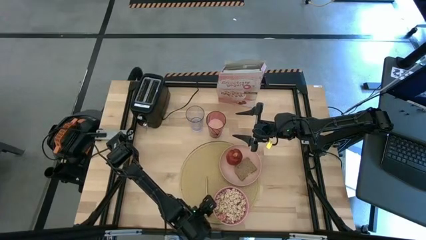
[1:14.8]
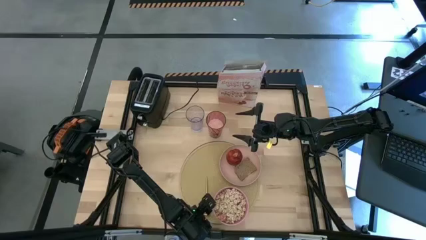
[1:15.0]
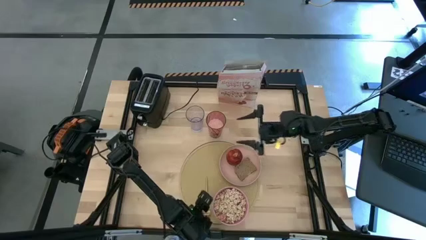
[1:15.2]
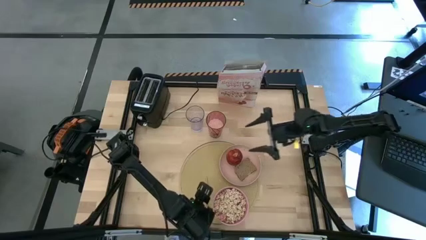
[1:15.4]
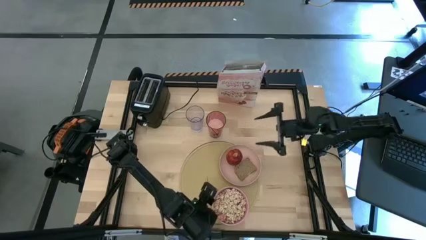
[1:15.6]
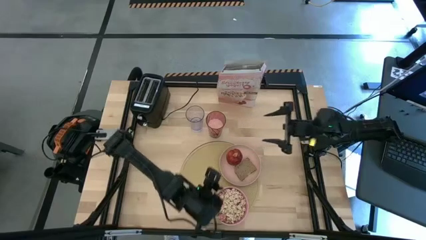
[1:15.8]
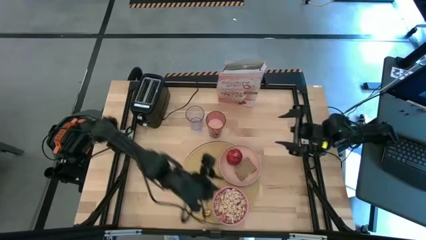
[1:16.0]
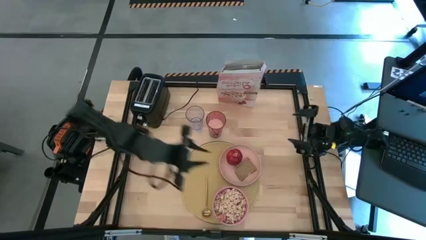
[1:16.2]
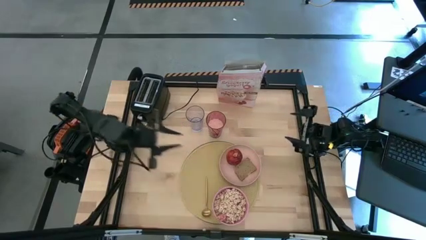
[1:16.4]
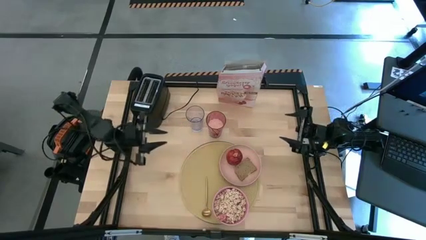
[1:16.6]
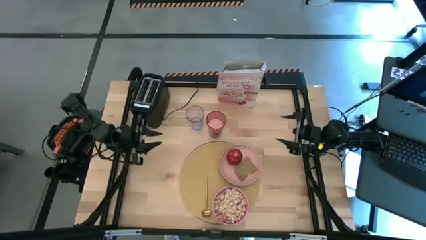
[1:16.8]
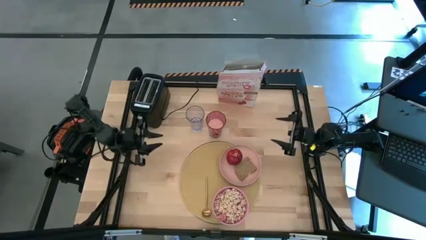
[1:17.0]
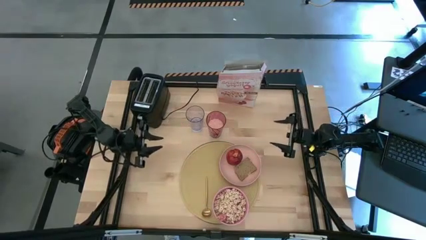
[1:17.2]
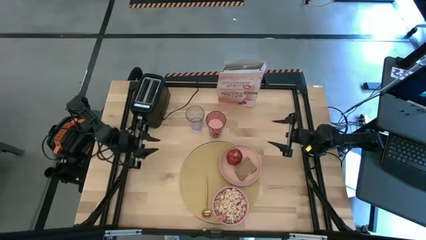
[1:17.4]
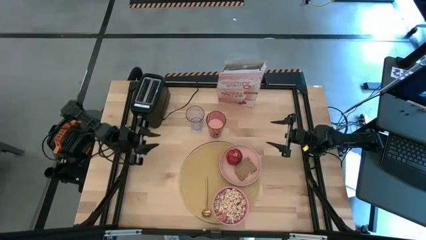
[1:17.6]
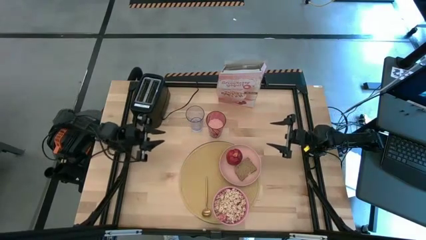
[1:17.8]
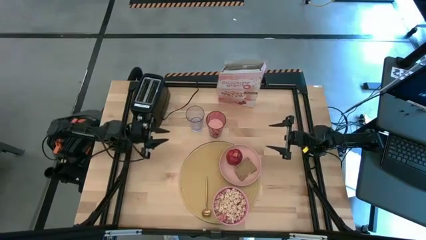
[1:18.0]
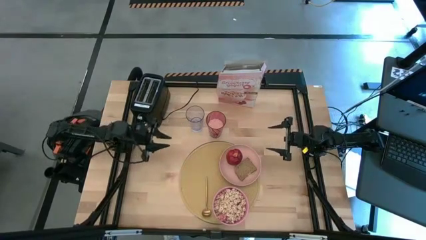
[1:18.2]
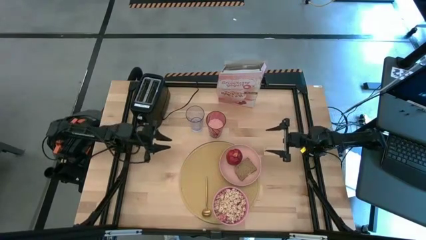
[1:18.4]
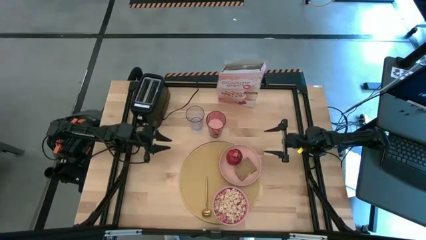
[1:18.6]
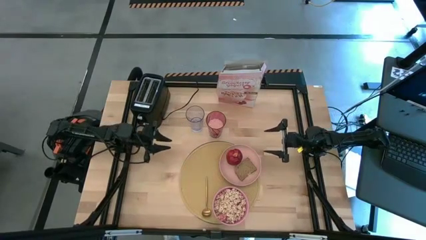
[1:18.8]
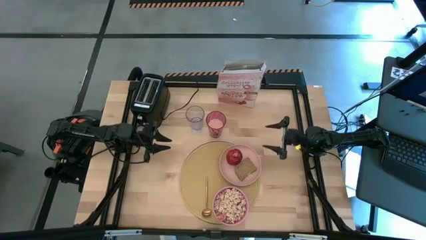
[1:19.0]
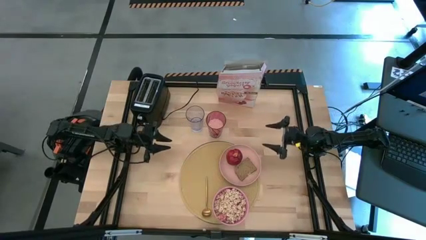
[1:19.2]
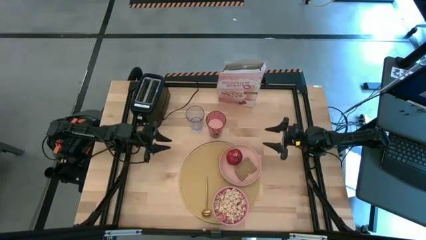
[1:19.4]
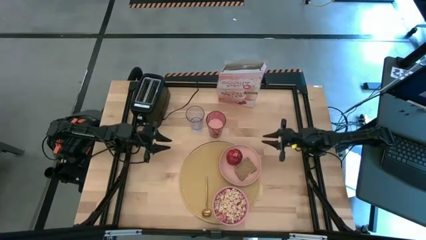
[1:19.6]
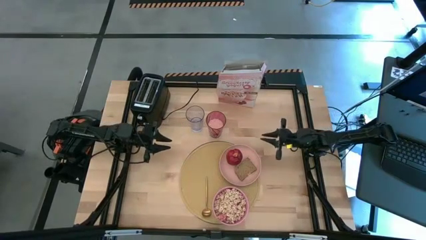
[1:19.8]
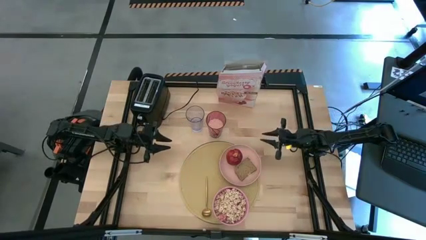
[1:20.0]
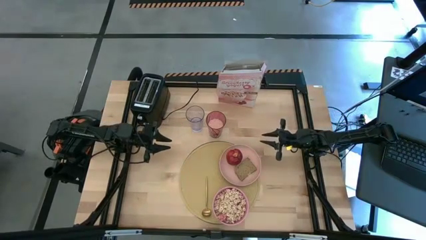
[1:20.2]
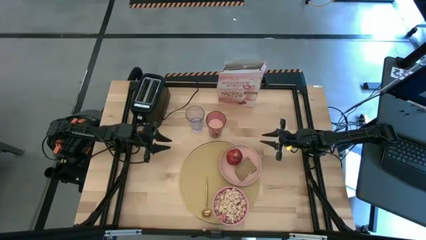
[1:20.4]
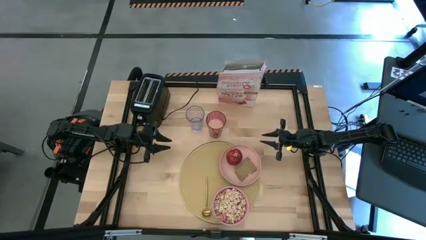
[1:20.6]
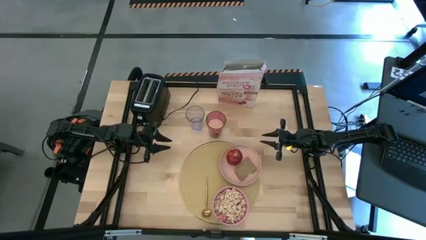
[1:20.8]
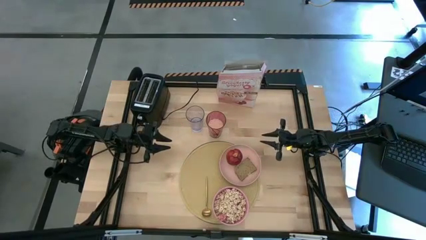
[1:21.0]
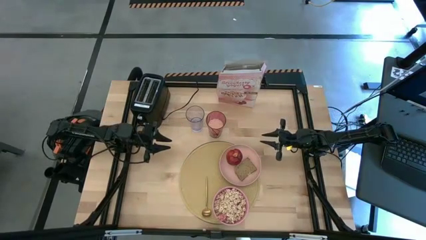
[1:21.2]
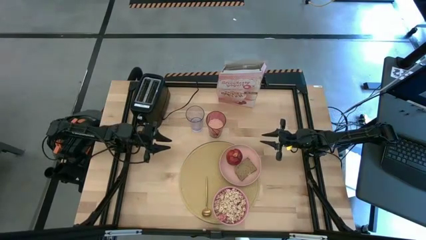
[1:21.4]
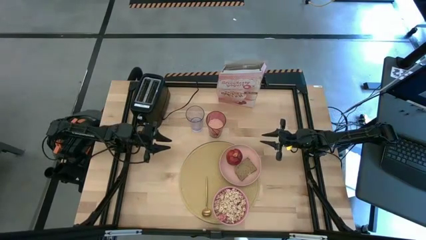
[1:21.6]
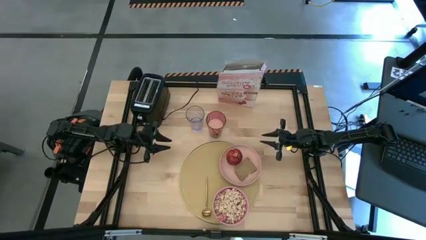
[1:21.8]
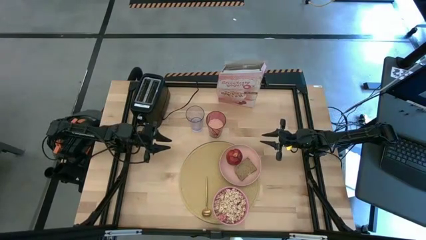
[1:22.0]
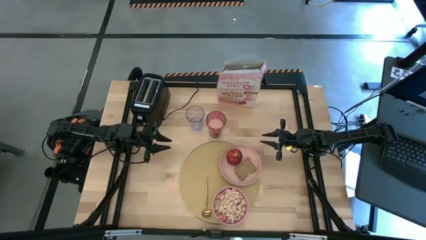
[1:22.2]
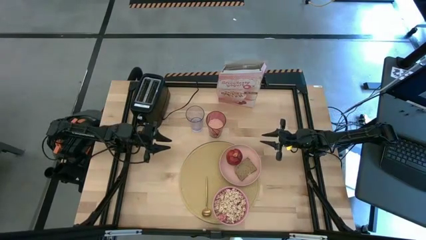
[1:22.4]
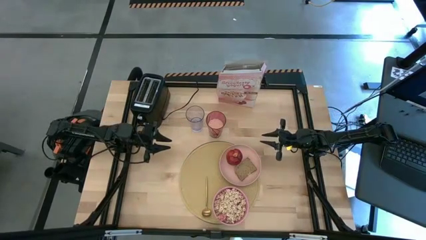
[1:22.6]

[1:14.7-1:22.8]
Task: Arrange a breakfast setting
Return to Home Position

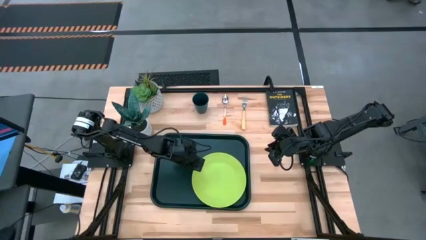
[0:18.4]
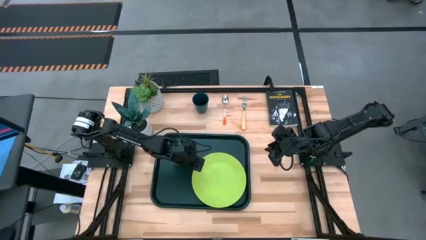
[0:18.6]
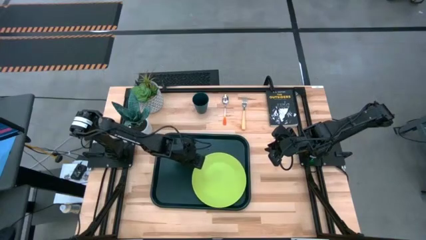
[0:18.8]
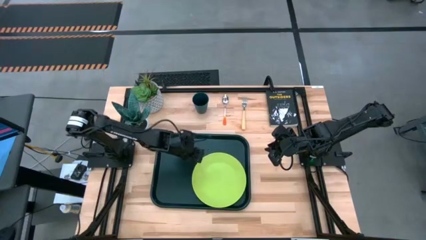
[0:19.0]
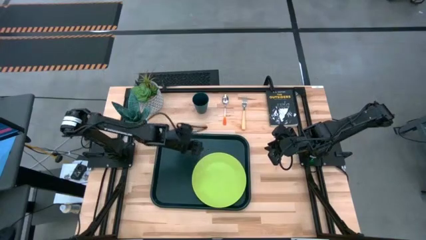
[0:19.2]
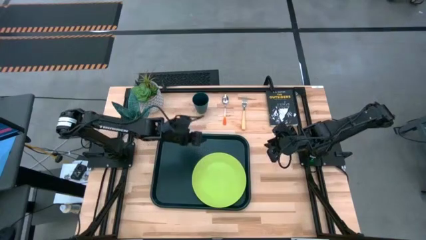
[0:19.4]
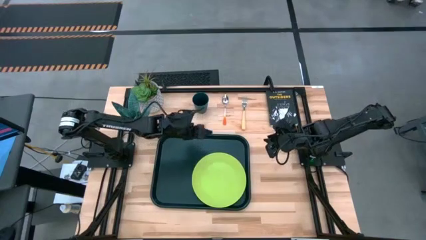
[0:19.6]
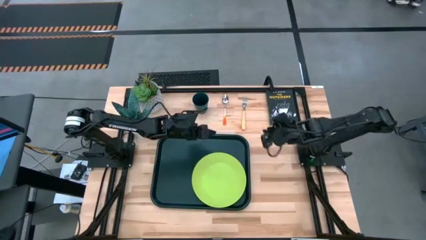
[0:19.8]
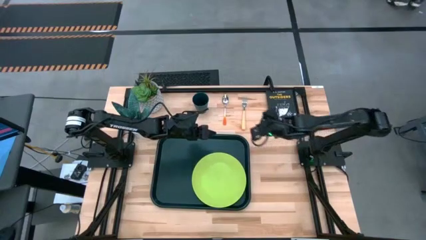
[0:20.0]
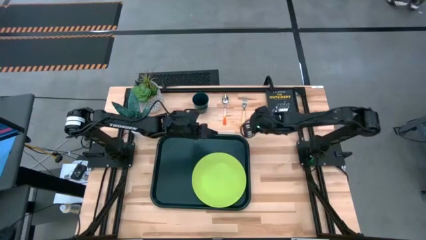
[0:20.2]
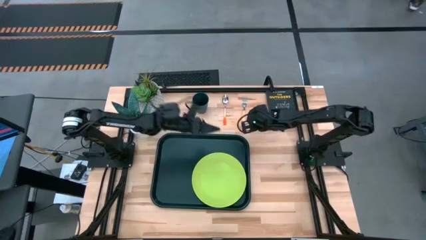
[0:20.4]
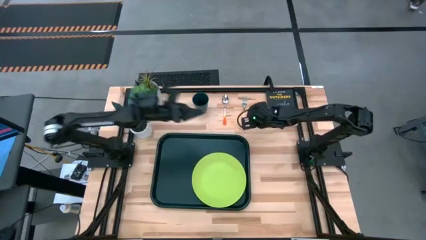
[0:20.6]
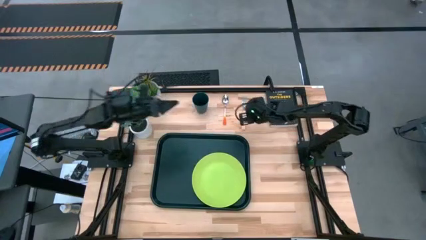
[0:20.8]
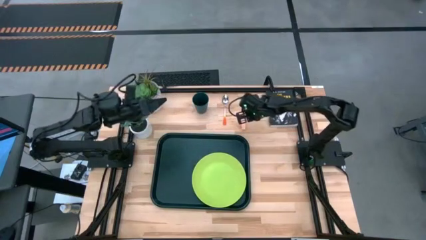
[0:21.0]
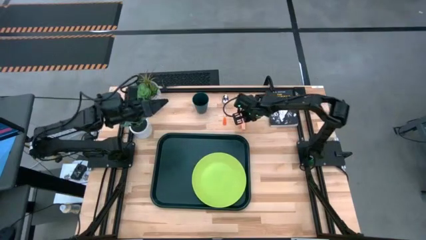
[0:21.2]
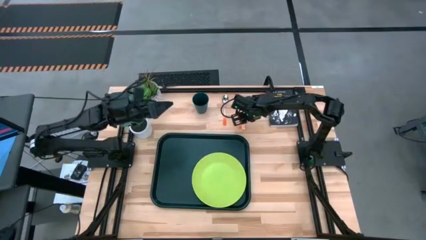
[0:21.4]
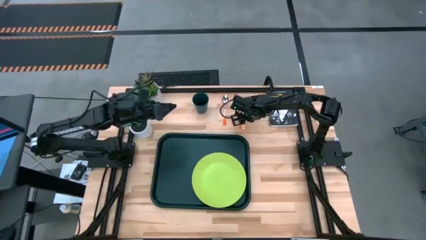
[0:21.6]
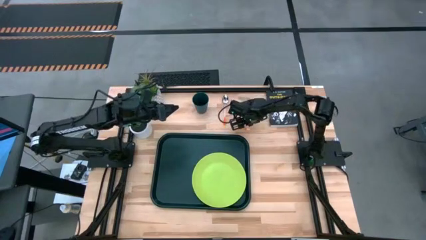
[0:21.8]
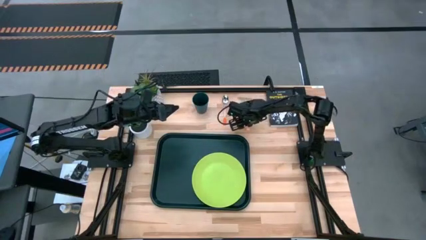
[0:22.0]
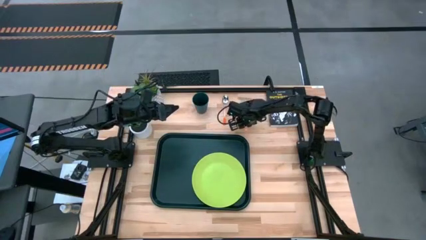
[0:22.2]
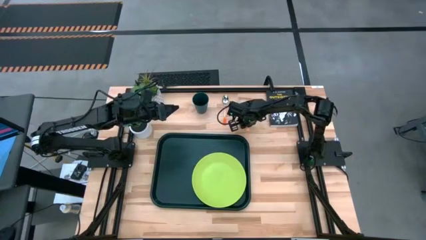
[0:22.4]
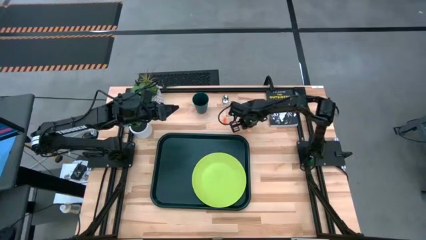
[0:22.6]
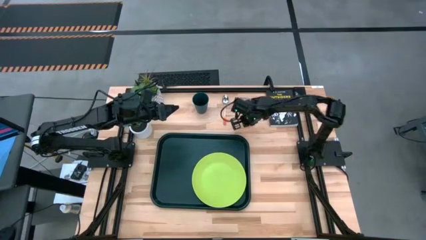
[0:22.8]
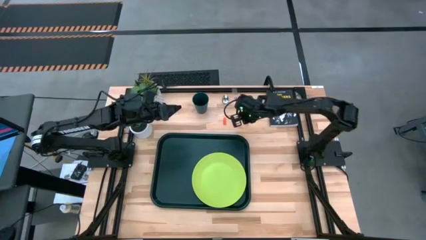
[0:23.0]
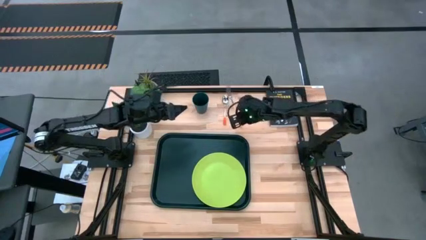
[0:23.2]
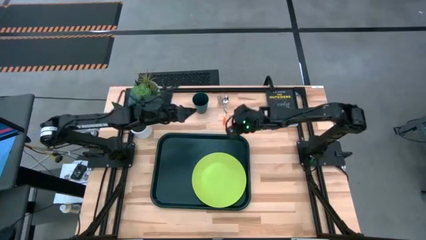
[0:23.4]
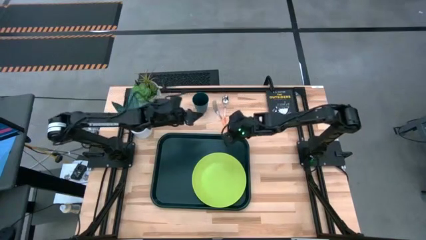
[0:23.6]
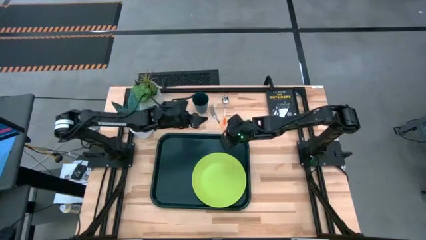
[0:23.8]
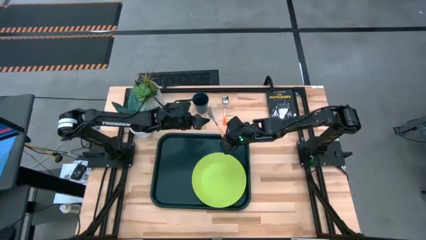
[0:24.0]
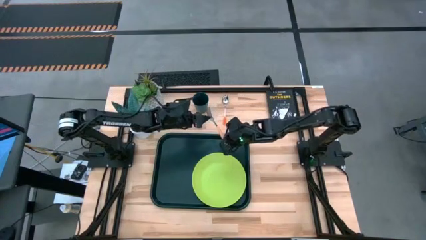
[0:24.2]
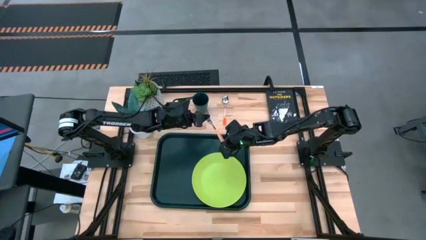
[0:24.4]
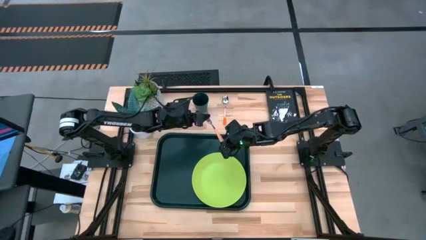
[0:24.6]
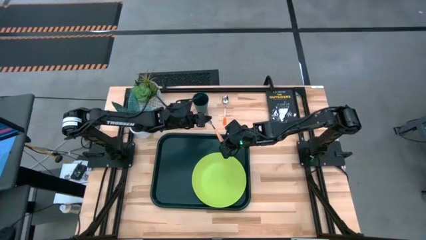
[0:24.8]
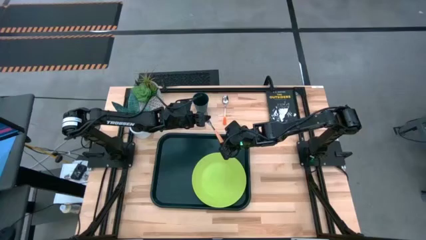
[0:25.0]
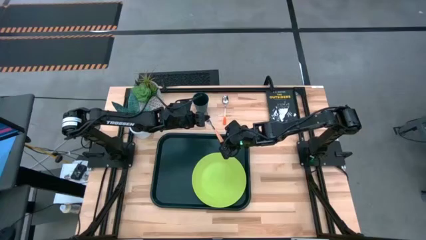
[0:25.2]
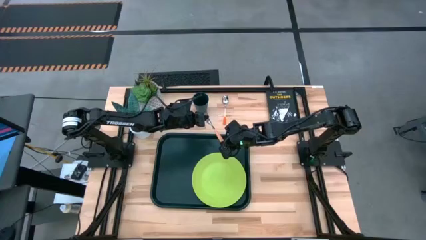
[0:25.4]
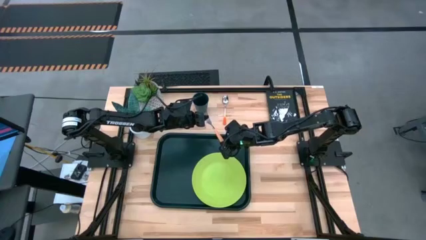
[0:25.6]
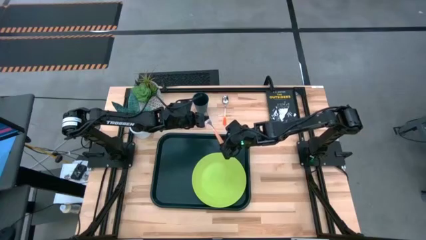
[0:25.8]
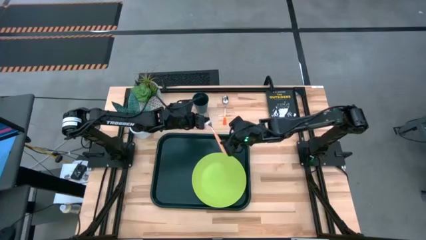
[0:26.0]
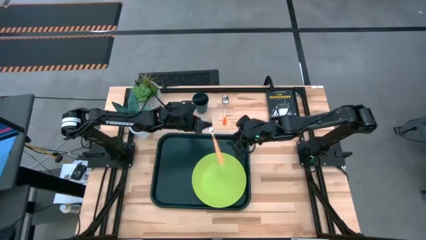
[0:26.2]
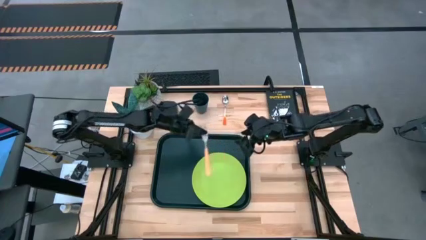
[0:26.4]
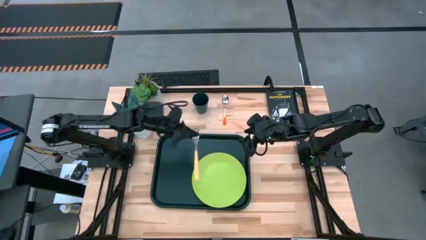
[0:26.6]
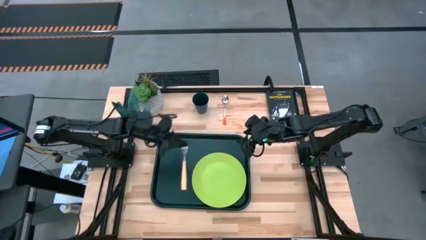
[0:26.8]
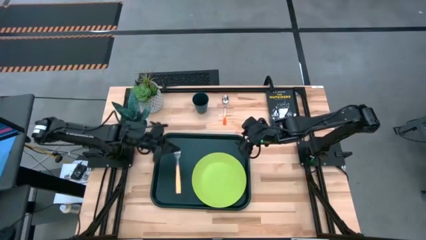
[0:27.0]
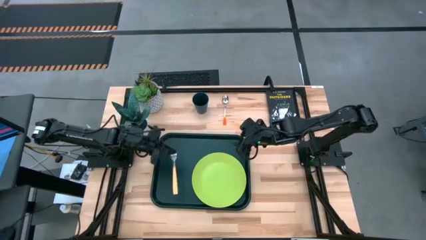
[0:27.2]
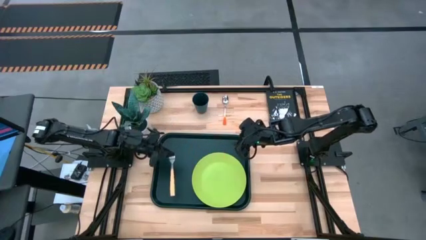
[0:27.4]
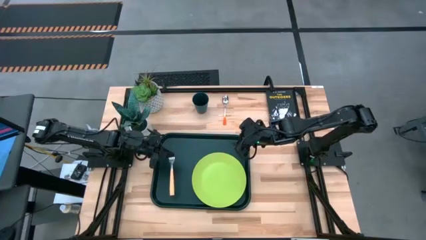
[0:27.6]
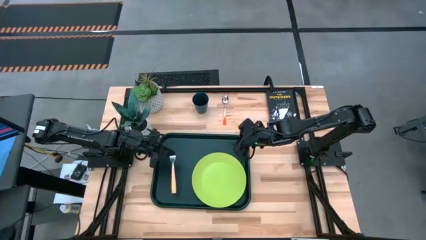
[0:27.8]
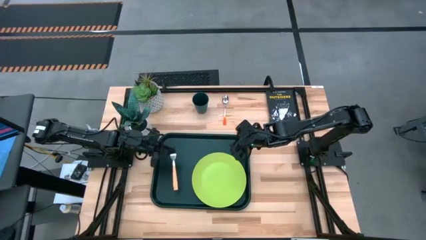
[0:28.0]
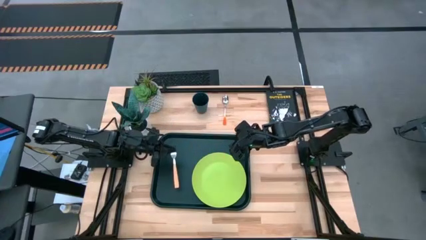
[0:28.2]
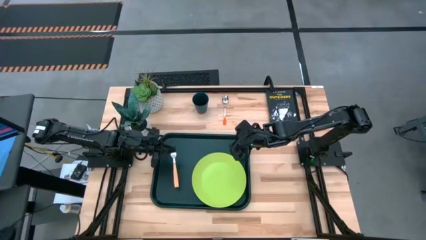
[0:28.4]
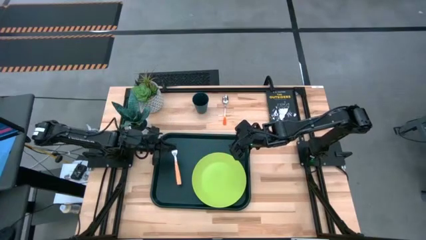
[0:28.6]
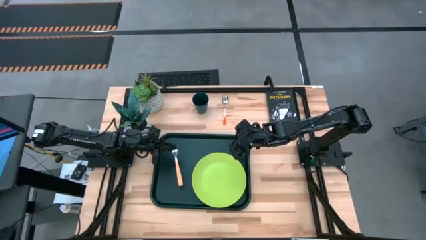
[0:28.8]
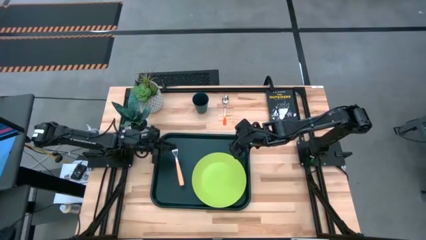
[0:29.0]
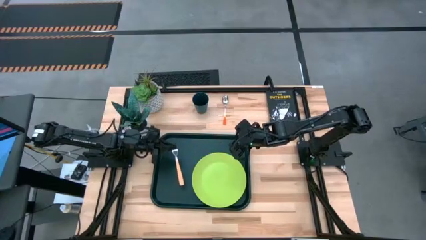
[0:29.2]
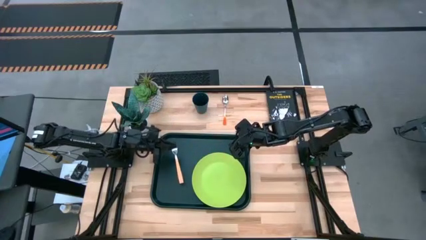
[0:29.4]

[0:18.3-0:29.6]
Task: Pick and place plate/cup/fork/spoon on tray
Put the orange fork on the black tray to the left of the green plate
